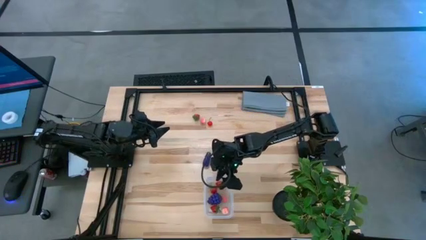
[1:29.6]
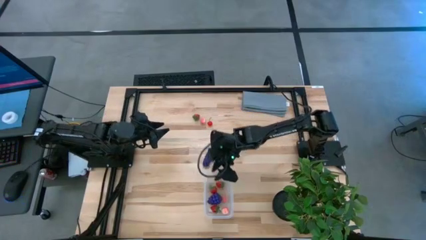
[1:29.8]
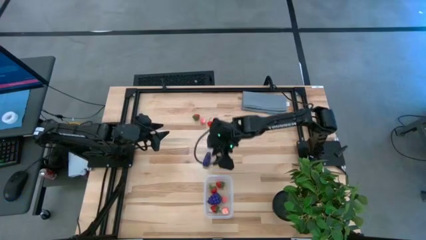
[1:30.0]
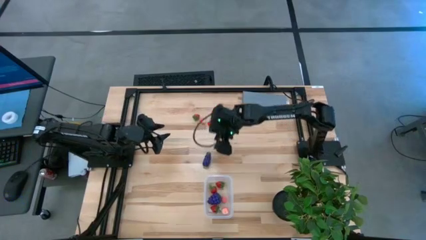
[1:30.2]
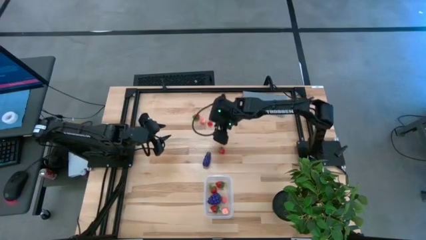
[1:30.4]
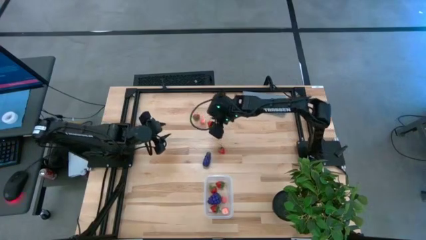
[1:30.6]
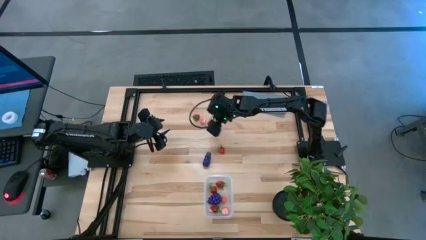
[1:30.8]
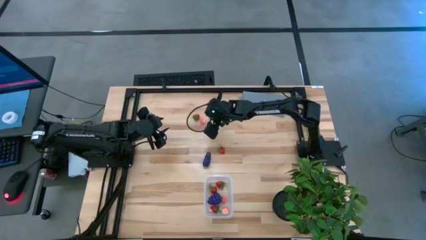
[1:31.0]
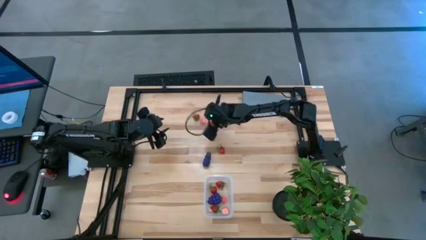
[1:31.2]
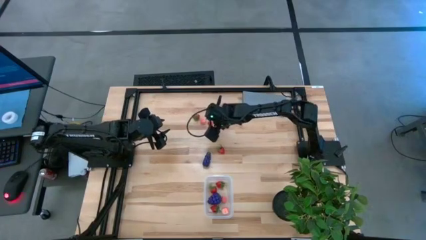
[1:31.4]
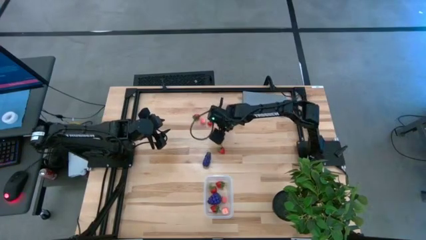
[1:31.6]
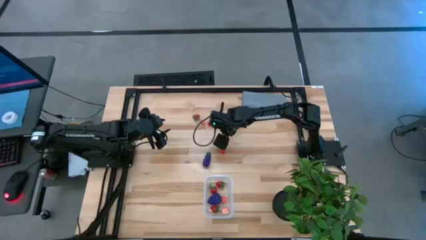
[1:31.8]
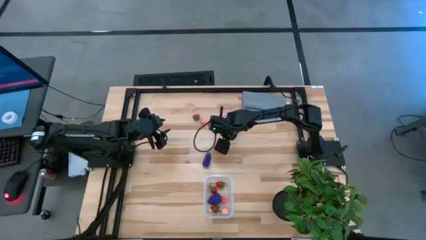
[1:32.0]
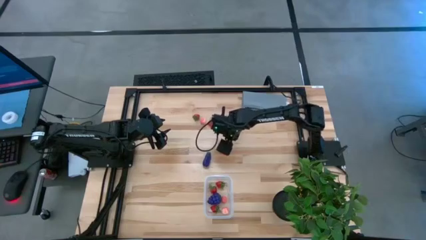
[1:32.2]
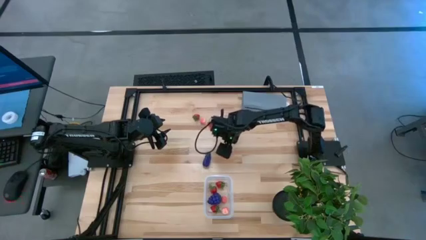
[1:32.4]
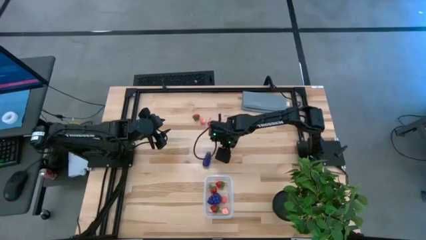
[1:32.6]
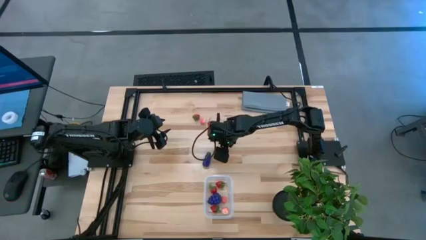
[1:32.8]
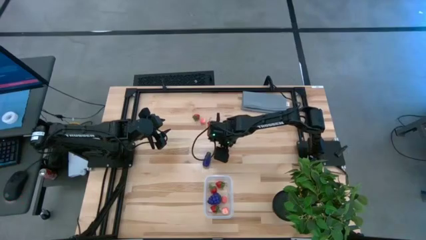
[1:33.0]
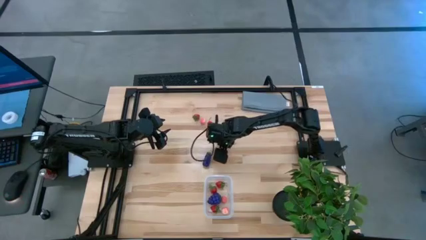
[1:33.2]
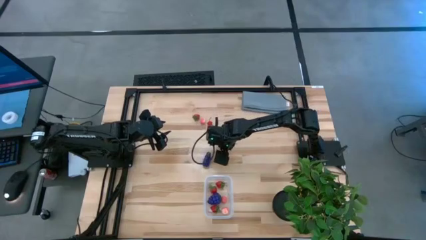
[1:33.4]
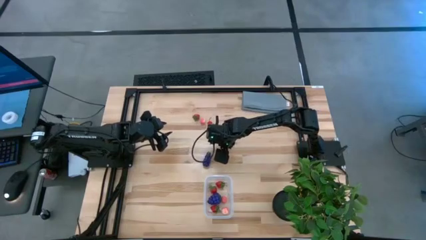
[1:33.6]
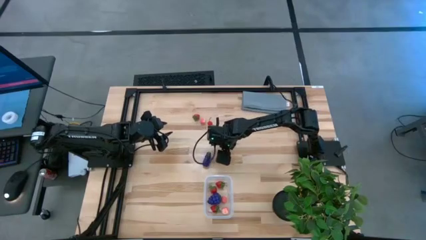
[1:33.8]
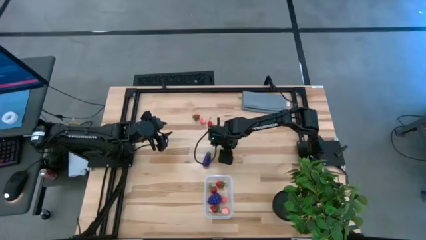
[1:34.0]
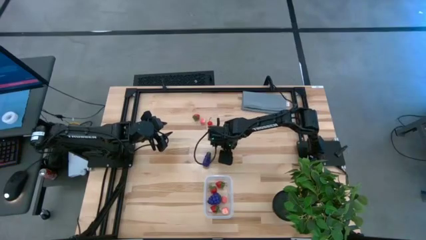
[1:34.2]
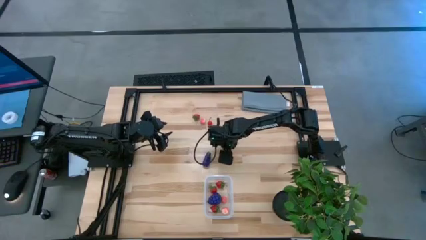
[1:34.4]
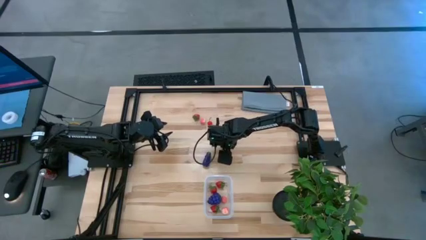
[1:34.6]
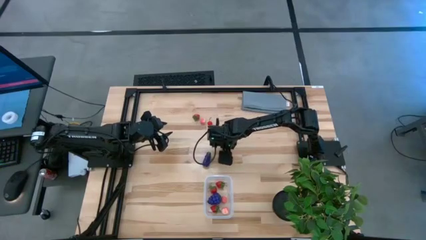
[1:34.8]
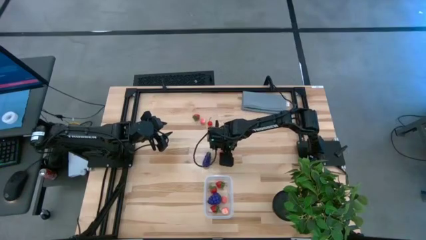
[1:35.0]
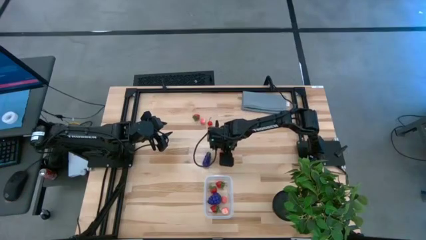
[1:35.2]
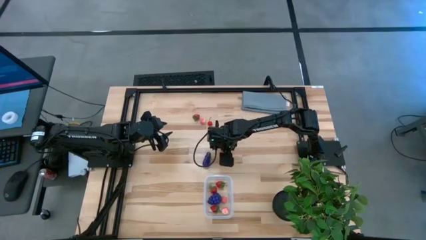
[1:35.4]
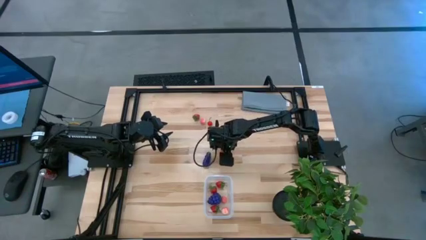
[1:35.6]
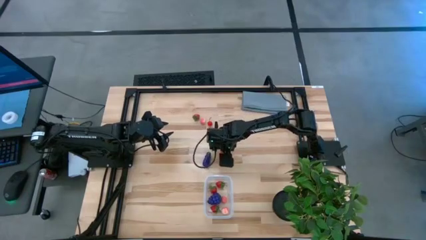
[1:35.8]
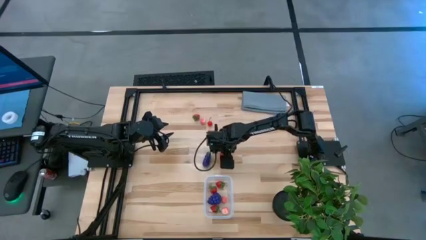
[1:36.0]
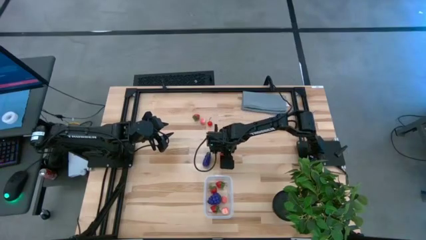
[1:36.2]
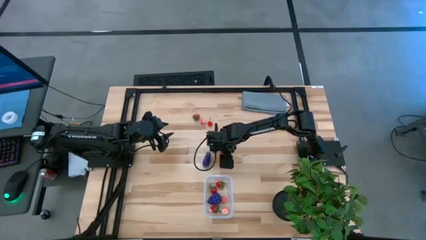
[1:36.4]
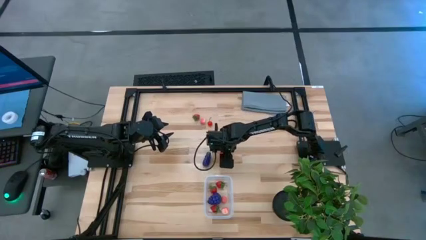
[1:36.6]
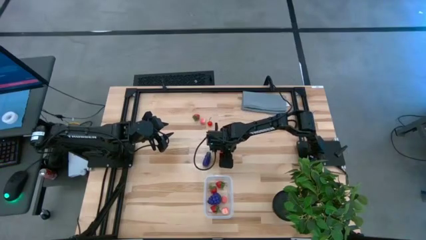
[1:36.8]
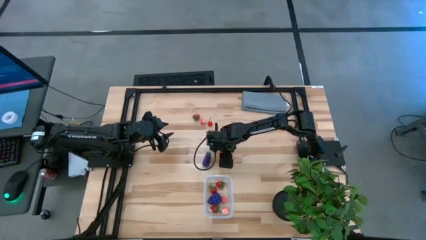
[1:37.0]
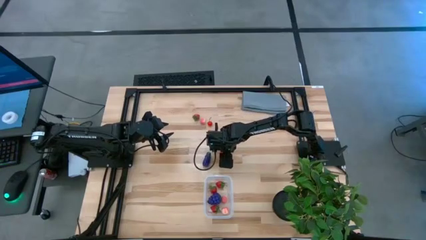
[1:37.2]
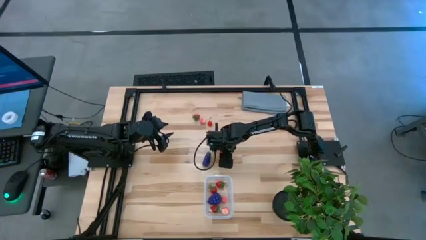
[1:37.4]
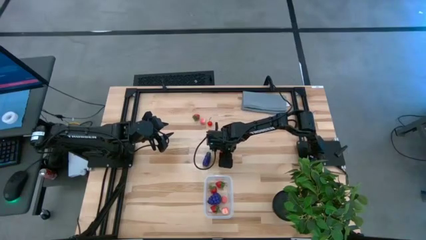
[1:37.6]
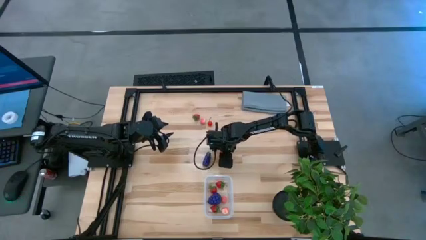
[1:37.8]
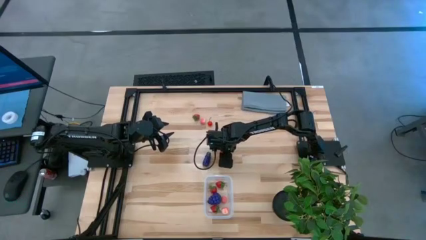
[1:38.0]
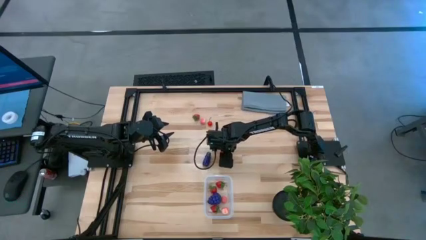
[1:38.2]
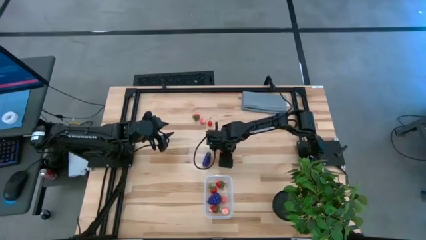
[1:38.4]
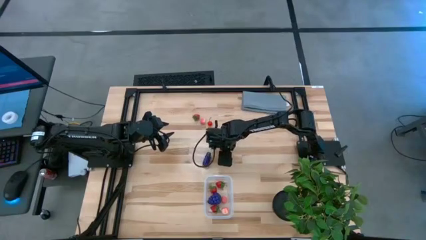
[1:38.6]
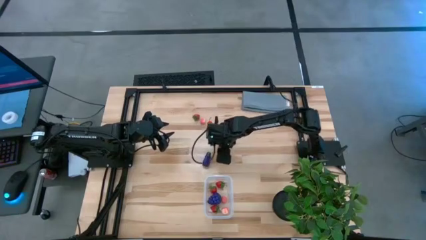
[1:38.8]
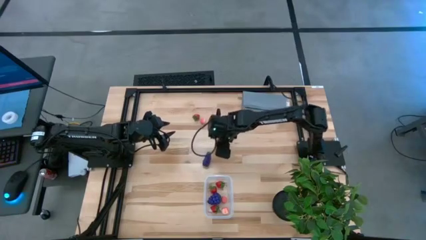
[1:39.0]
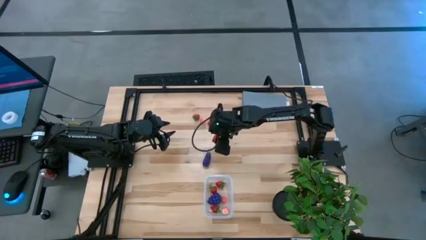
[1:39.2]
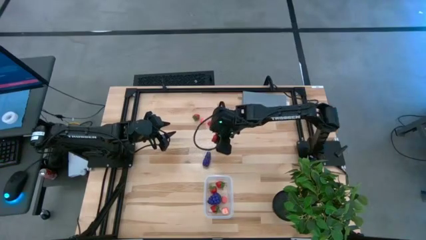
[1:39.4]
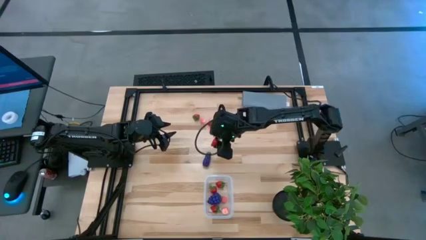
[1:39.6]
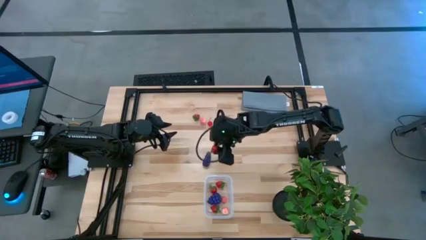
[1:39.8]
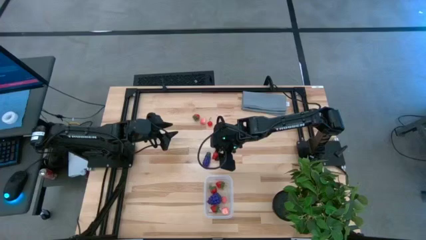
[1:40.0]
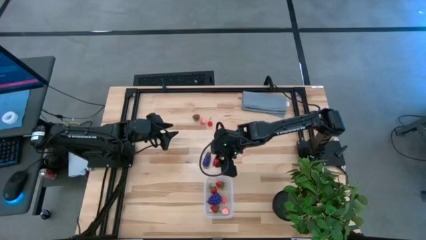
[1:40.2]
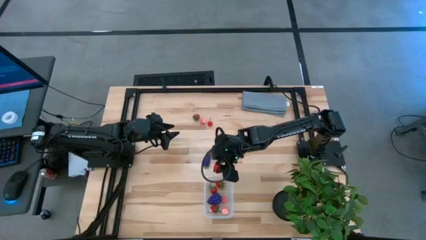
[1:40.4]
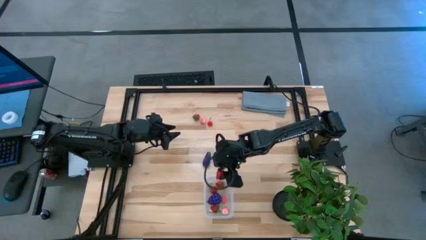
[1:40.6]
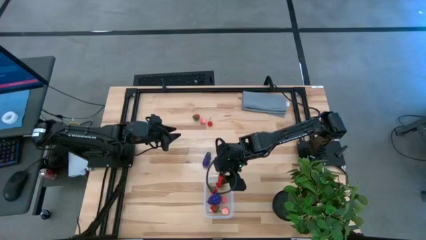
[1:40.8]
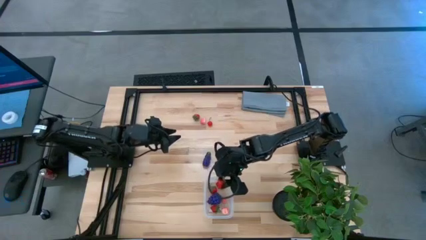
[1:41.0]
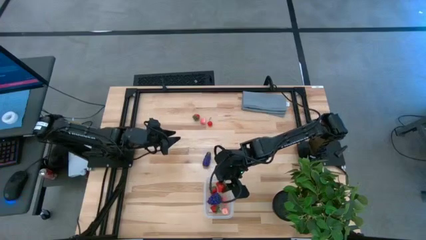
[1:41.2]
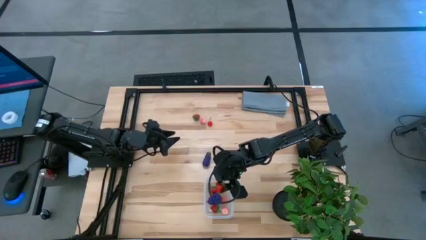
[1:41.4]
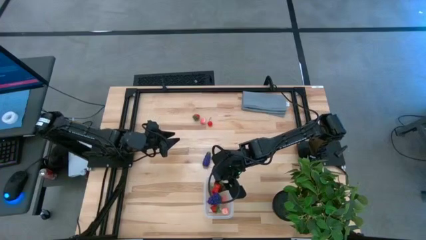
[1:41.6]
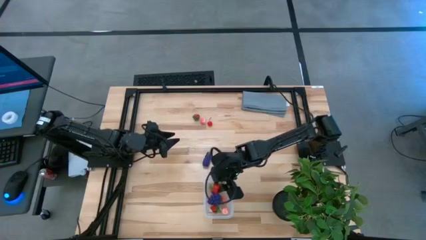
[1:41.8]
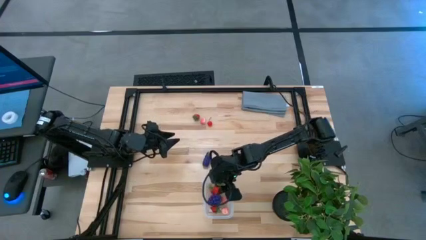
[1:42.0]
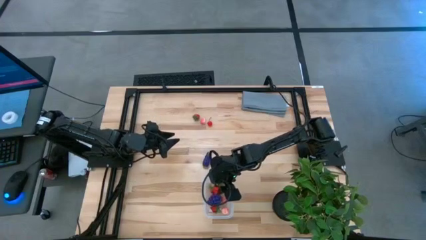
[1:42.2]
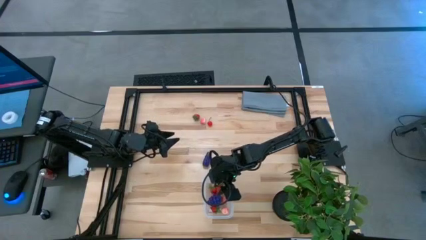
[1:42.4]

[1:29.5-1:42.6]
Task: Pick and placing Produce into tupperware
Put the red strawberry into the transparent bin

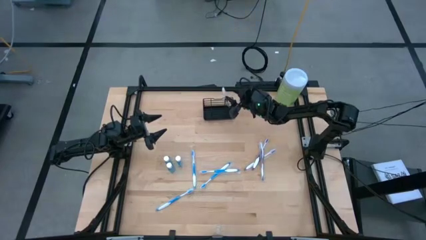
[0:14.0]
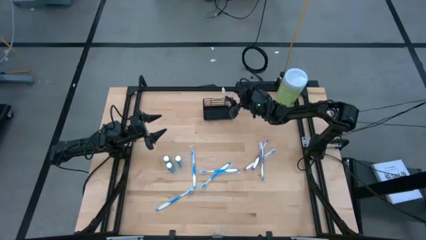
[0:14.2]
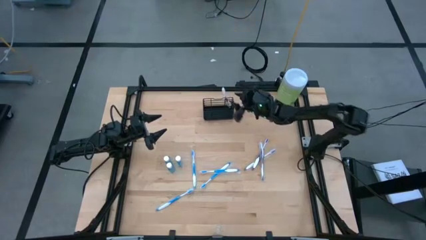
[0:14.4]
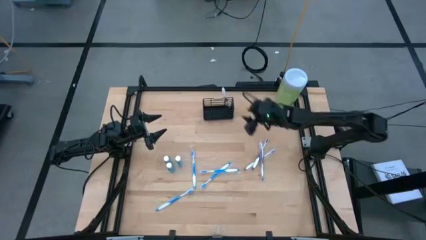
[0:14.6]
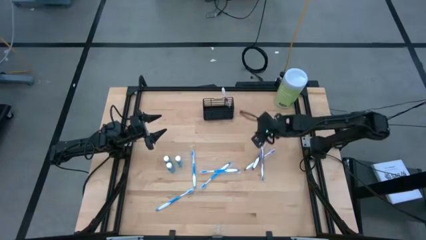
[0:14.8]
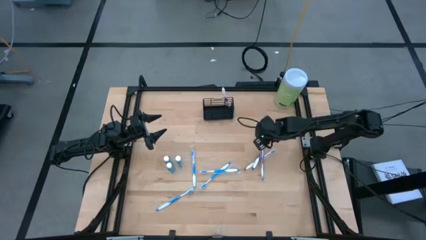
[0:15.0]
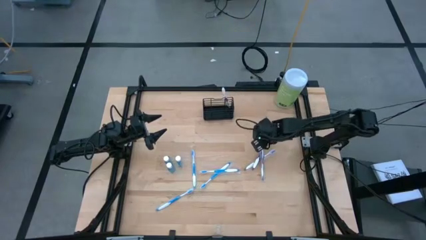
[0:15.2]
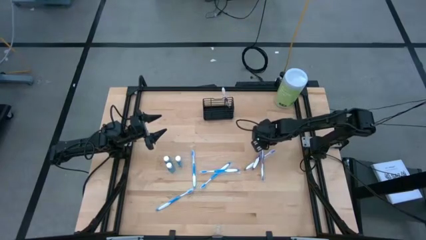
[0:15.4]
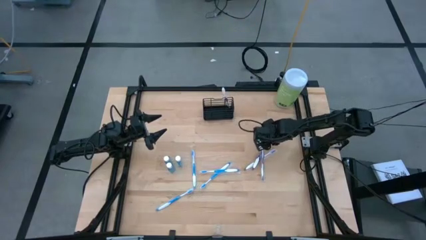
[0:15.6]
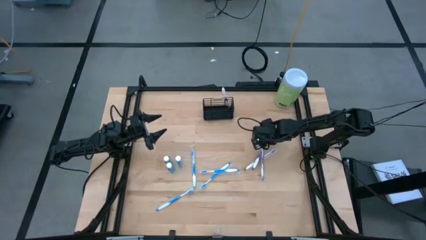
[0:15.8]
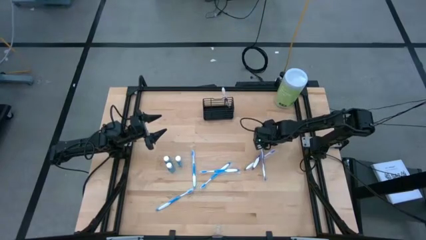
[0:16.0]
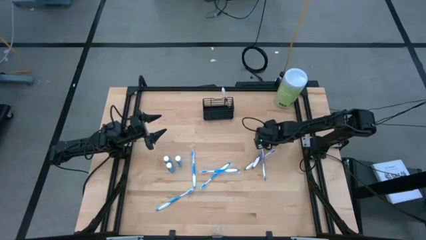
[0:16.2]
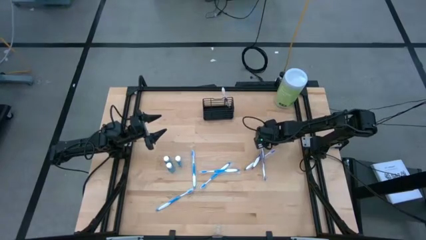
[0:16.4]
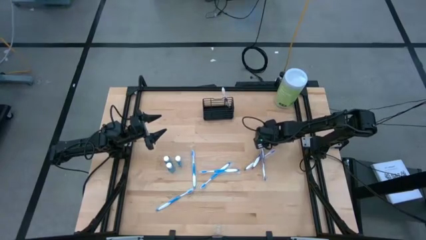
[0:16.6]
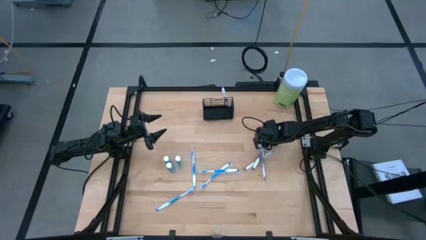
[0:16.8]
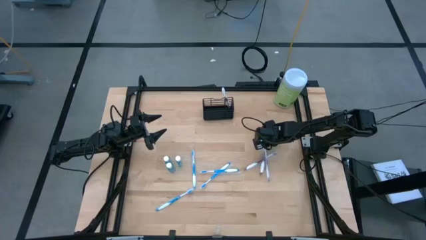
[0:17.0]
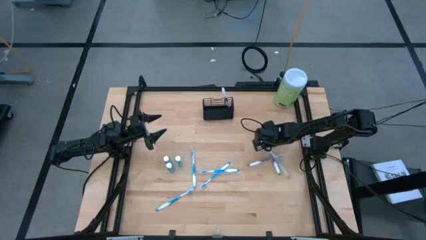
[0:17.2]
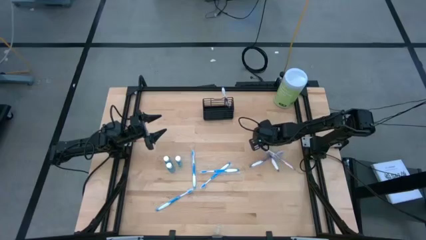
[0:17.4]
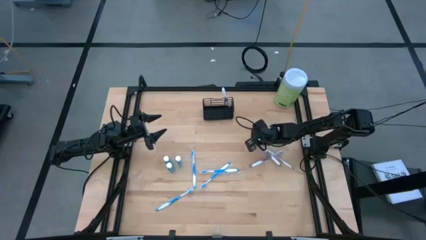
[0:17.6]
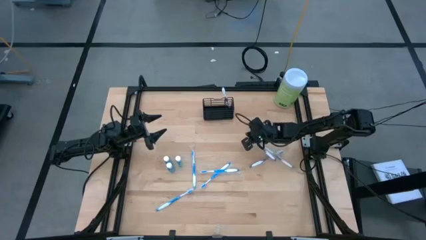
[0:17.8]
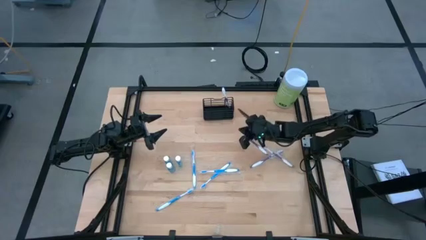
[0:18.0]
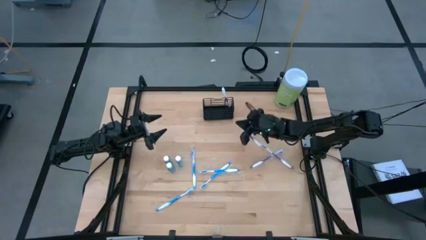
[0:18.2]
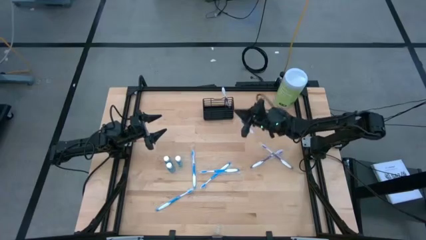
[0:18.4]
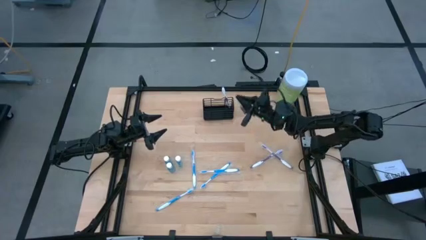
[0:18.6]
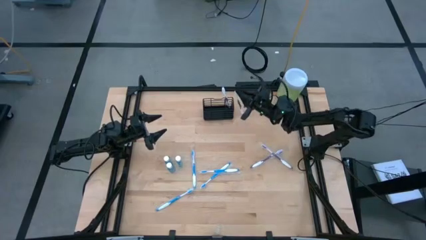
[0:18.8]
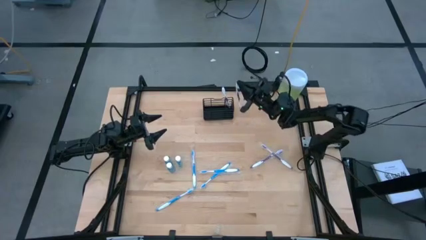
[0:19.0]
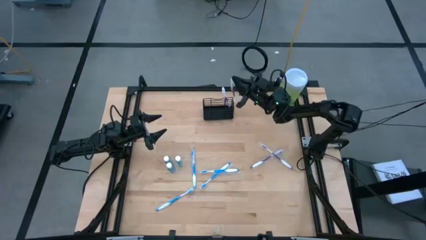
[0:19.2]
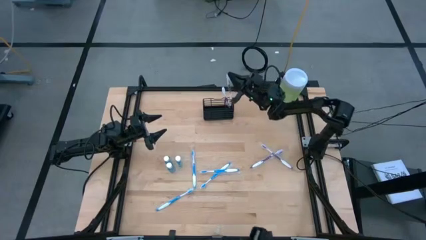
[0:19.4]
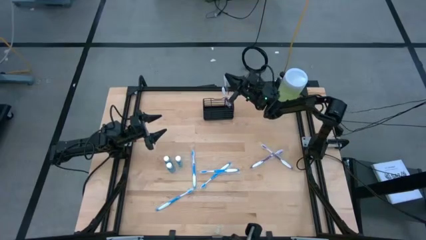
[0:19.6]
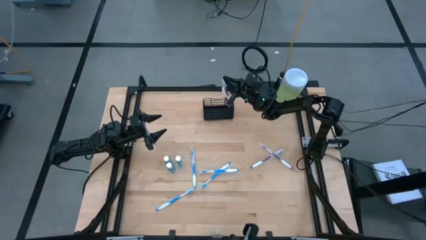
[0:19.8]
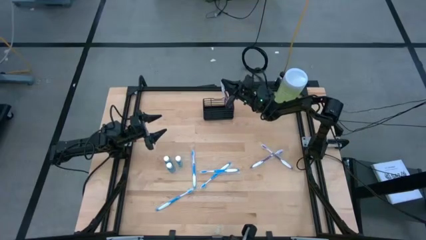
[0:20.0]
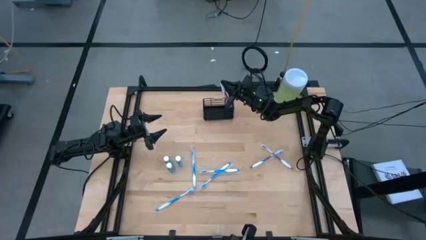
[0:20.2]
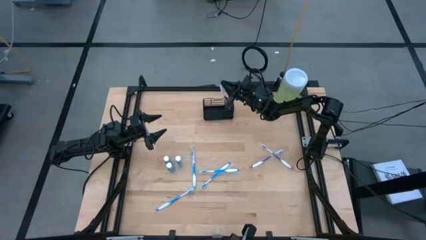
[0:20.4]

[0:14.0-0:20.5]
Task: Pick & Place toothbrushing station
Put the violet toothbrush into the right compartment of the wire organizer
